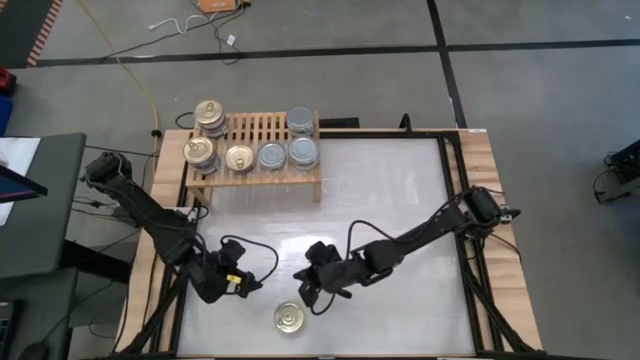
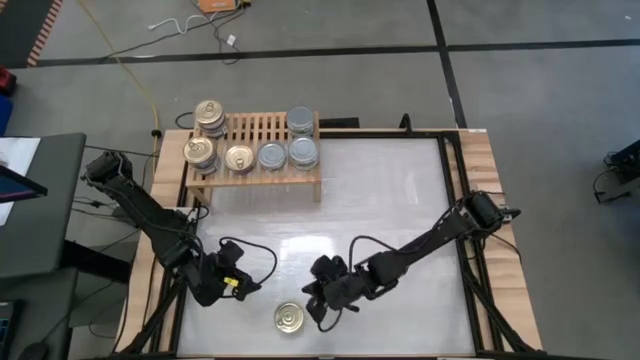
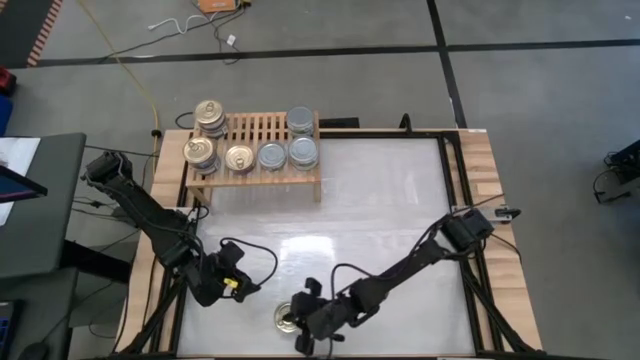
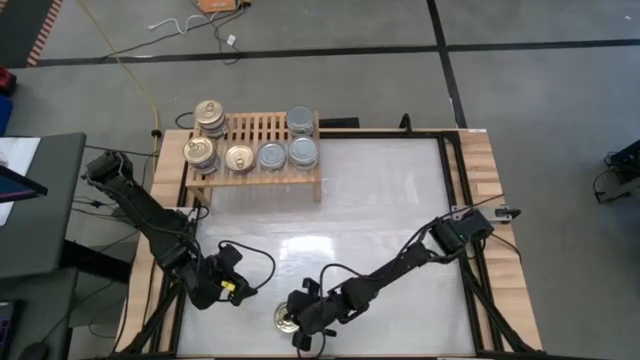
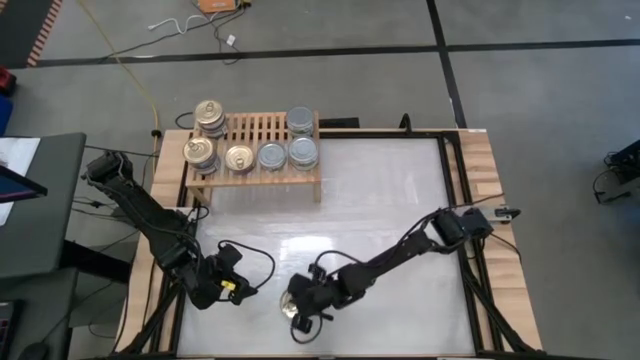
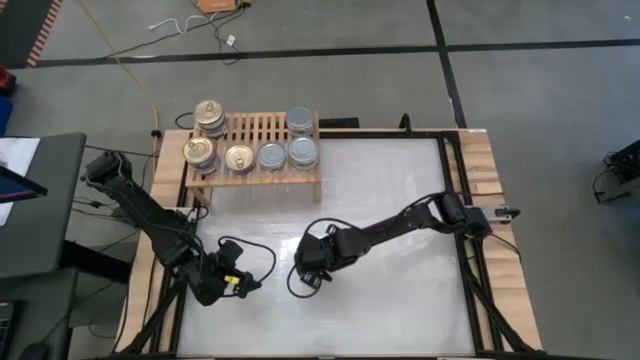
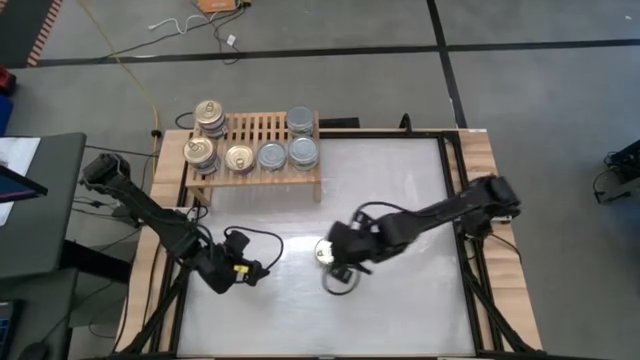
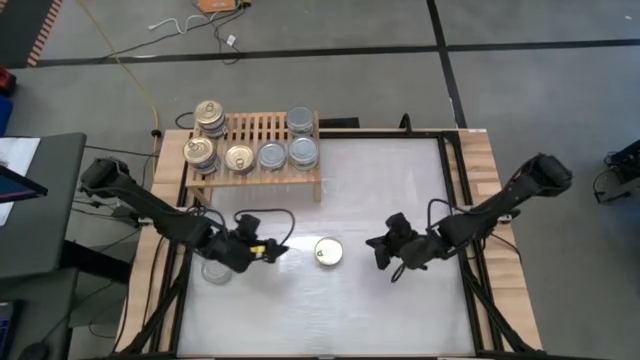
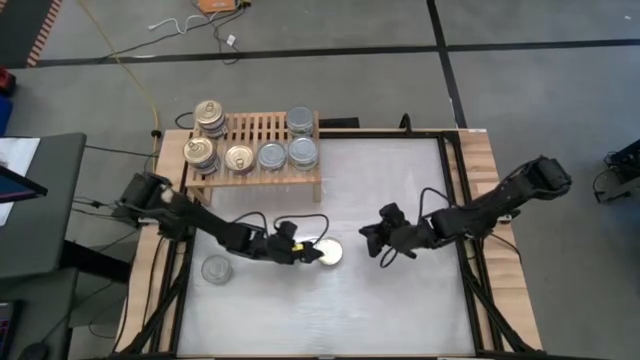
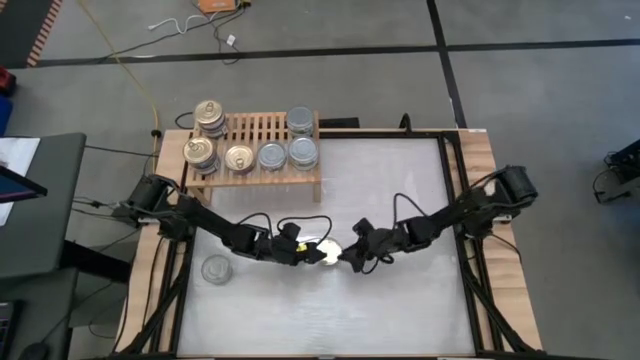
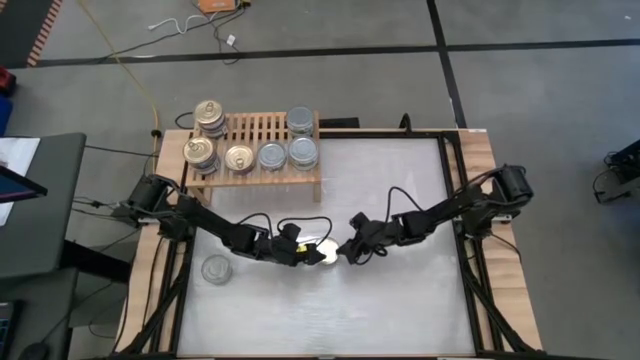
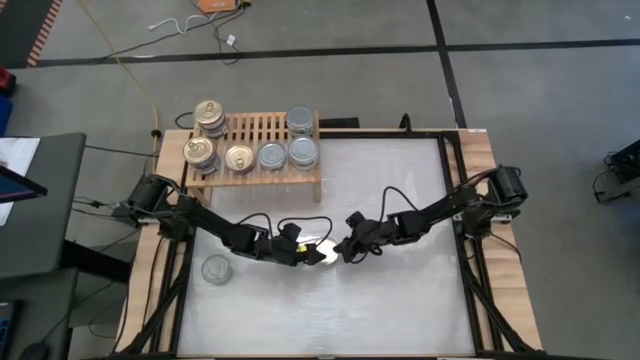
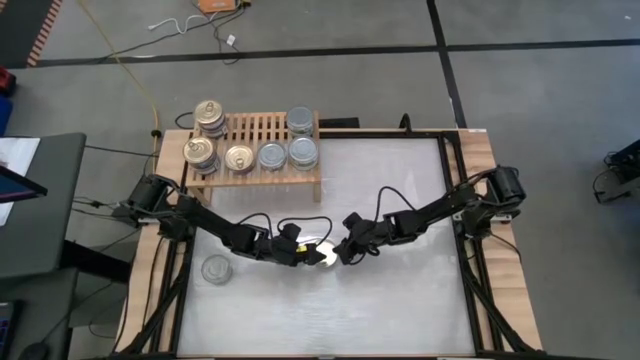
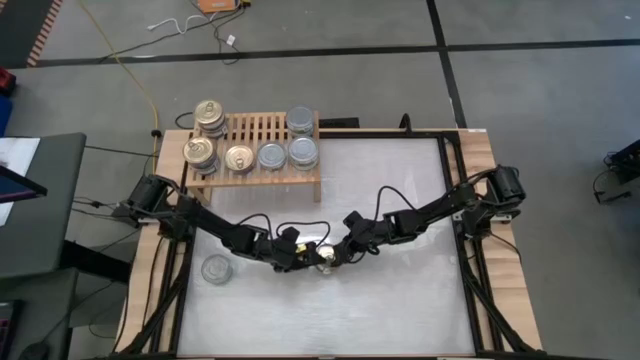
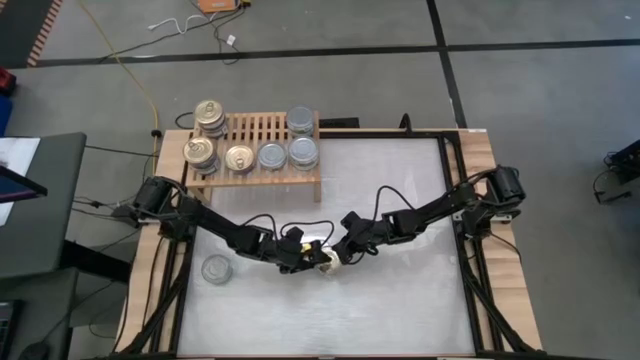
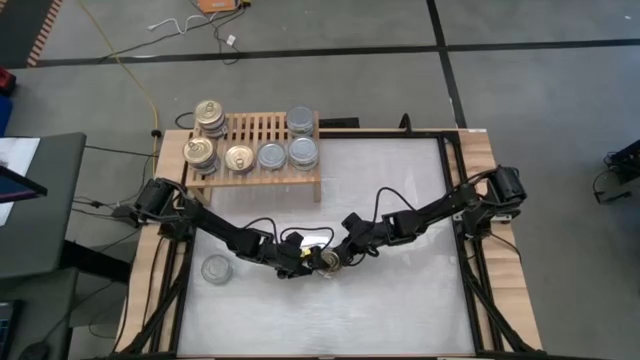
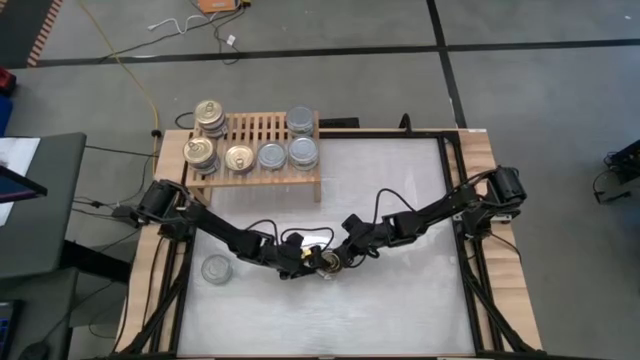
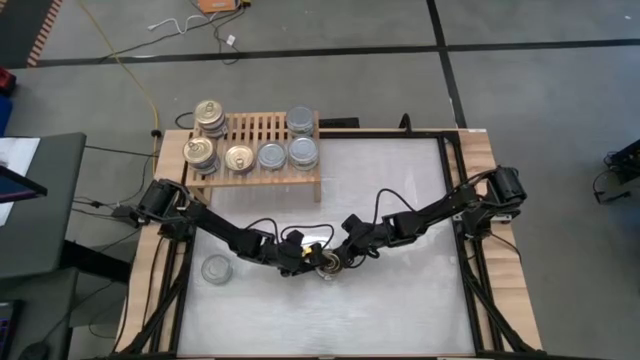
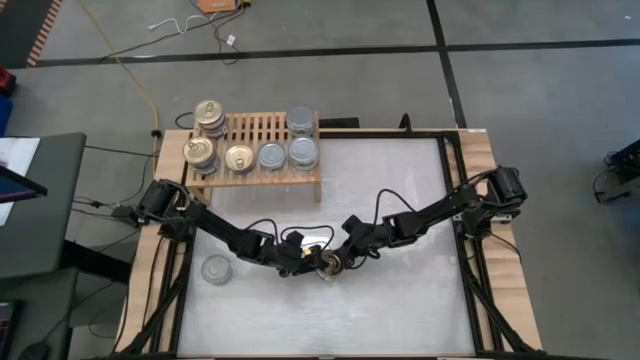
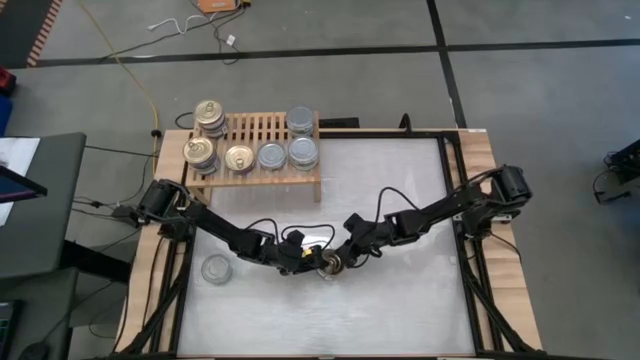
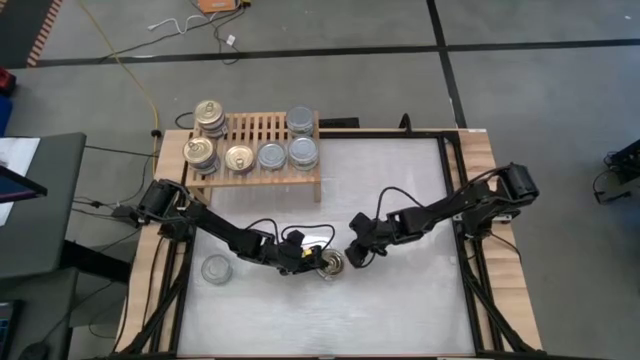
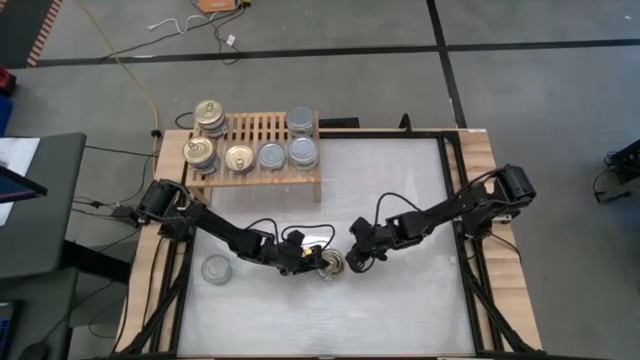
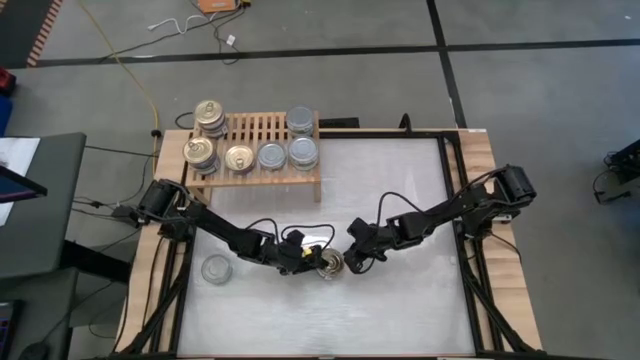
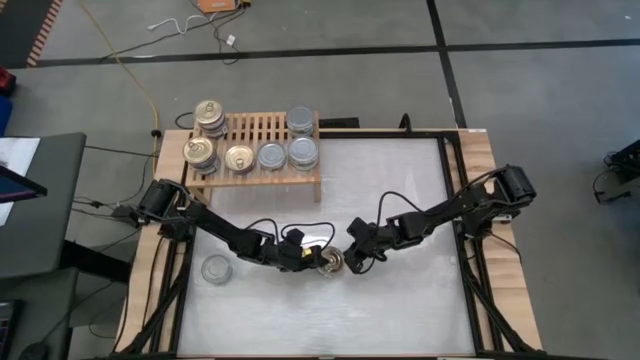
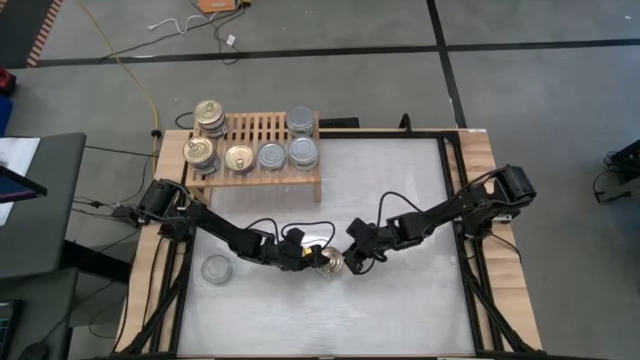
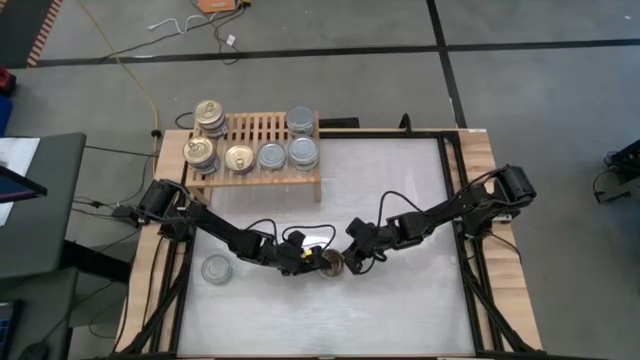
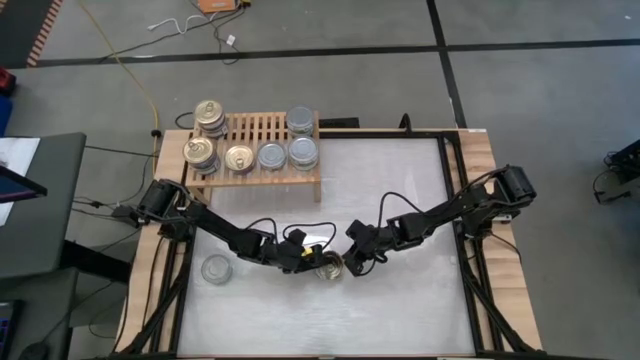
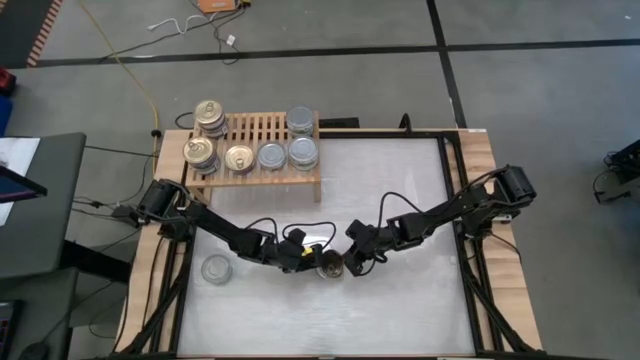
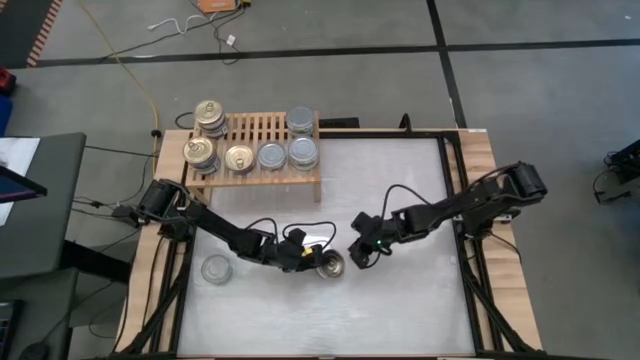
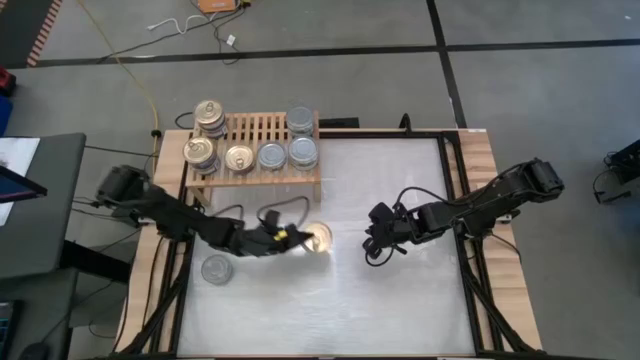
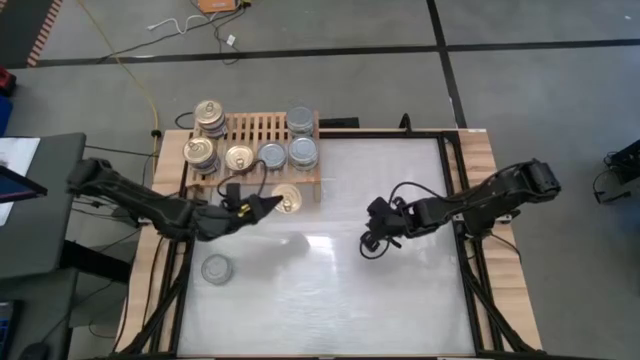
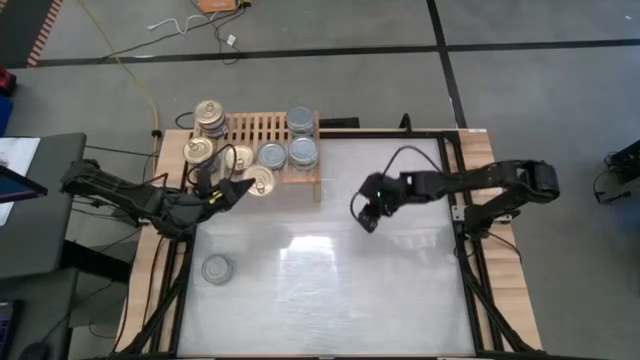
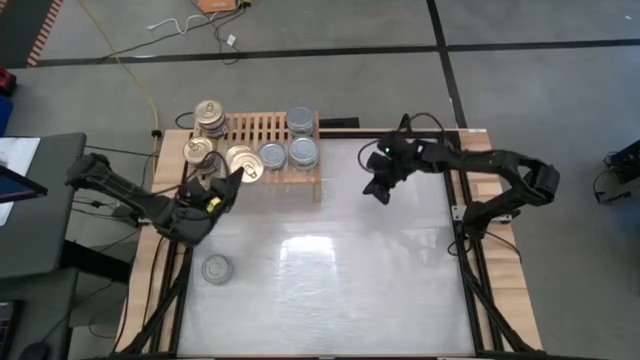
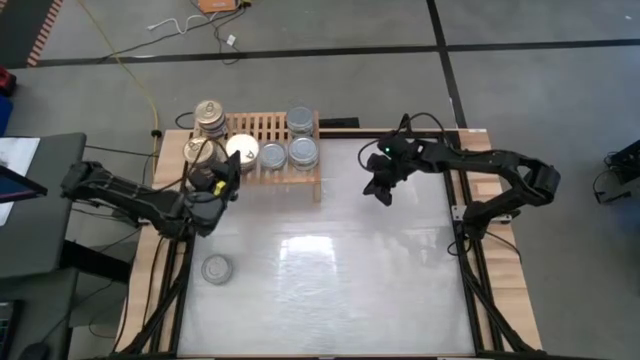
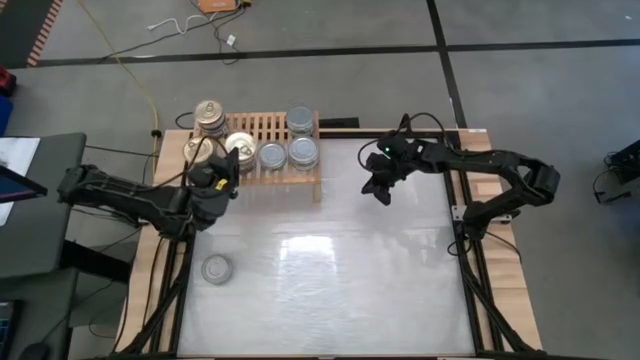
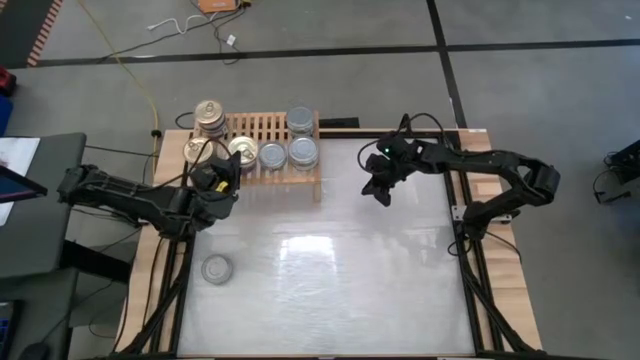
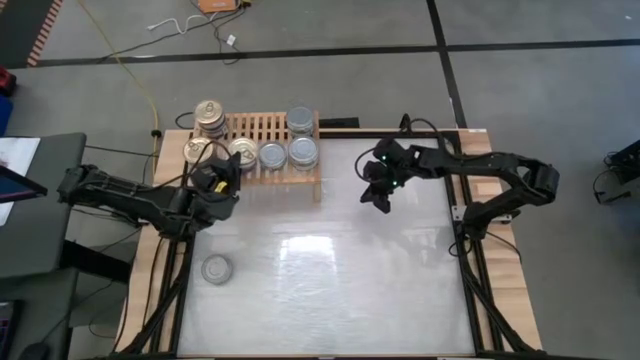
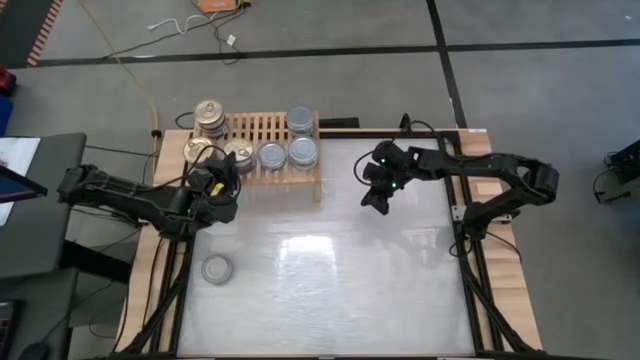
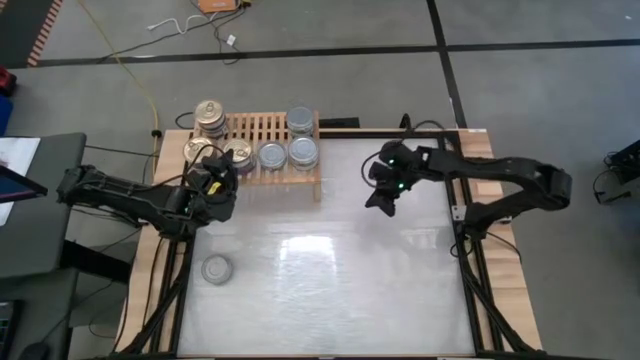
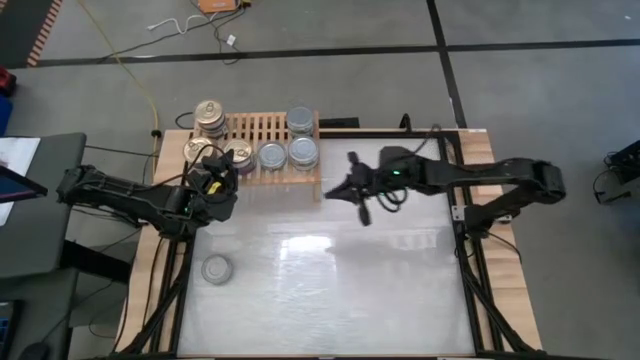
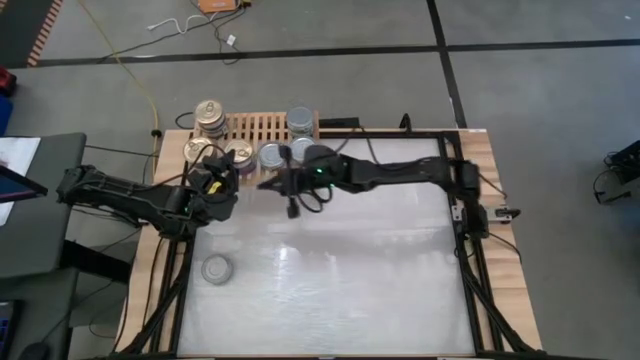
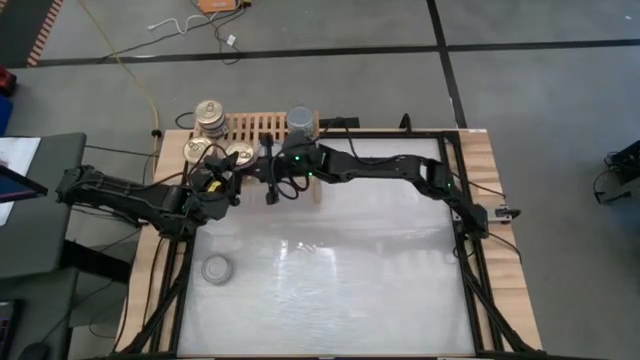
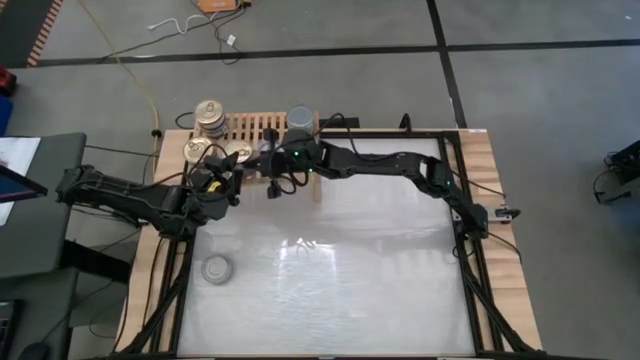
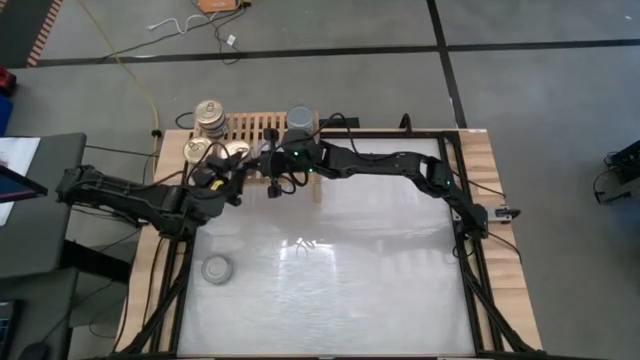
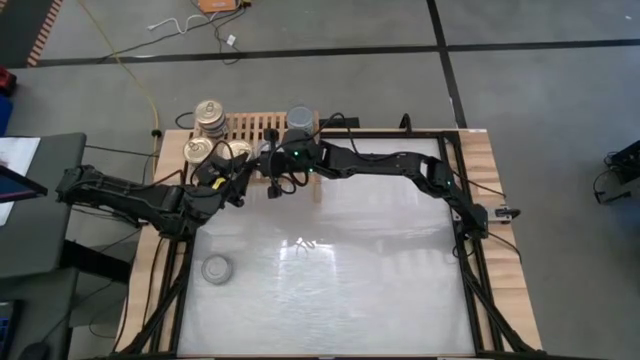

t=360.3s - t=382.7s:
Task: Stack canned seafood by type on shelf
Stack the blue tuna can on top of the bottom right blue tuna can on the shelf
